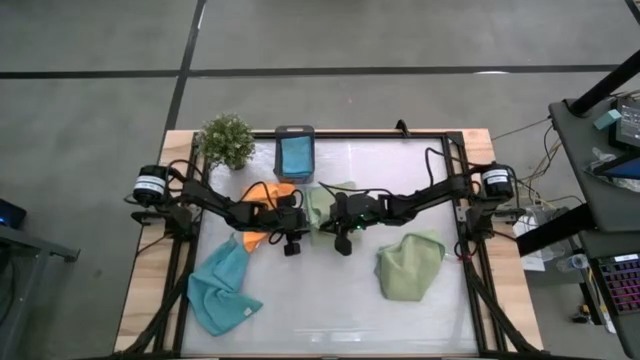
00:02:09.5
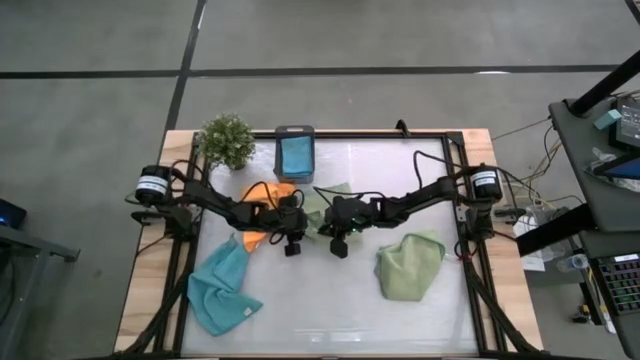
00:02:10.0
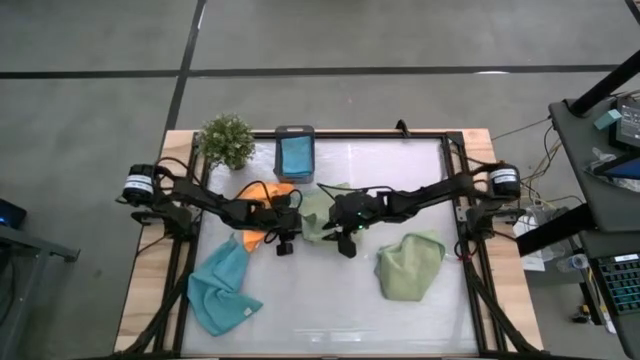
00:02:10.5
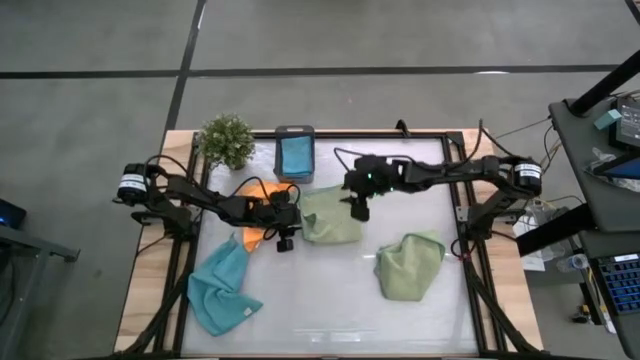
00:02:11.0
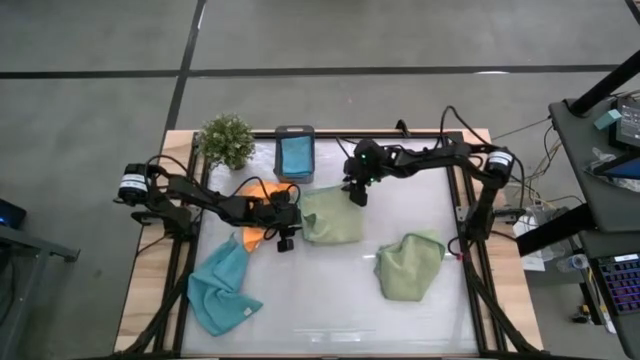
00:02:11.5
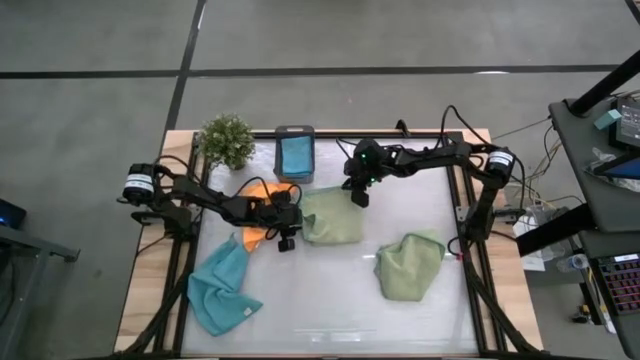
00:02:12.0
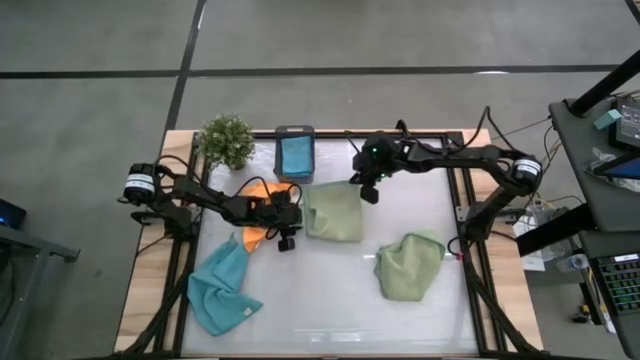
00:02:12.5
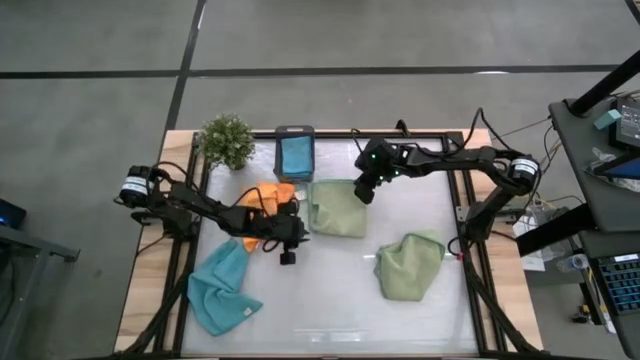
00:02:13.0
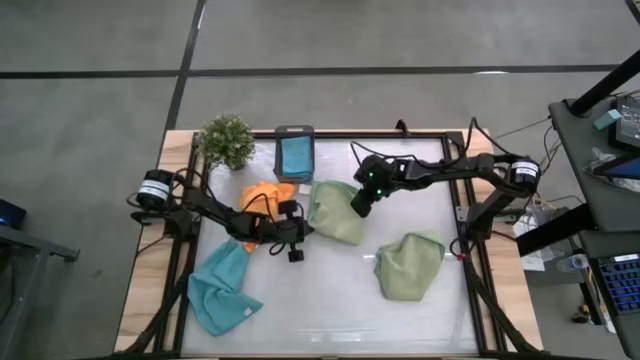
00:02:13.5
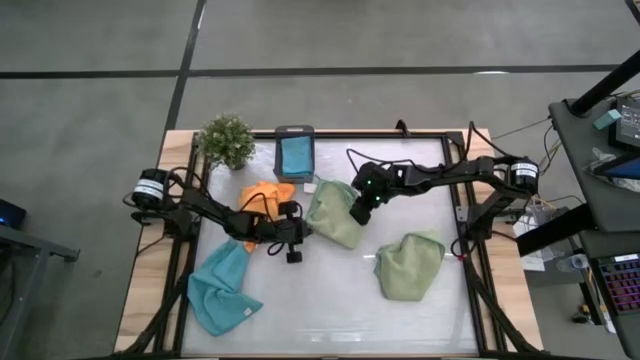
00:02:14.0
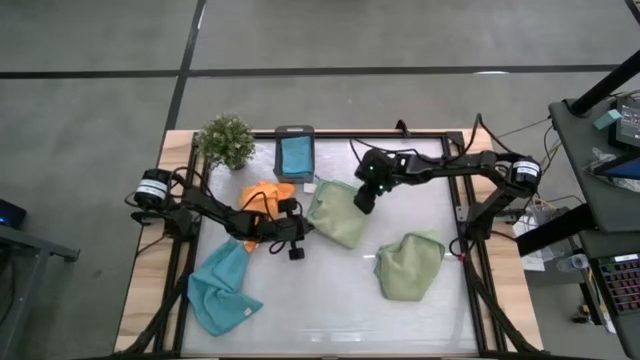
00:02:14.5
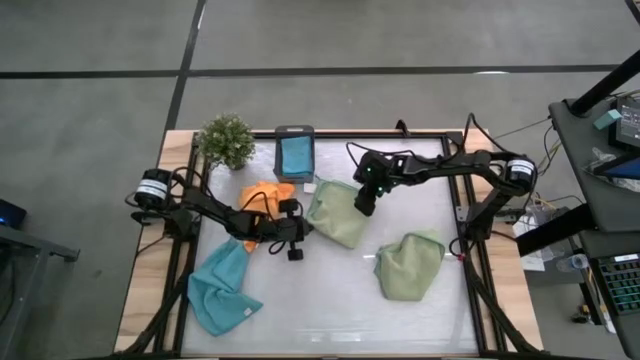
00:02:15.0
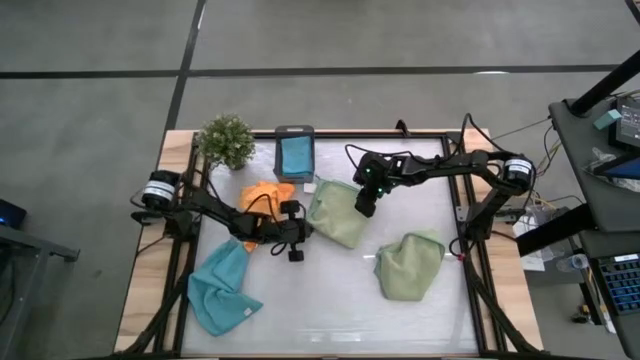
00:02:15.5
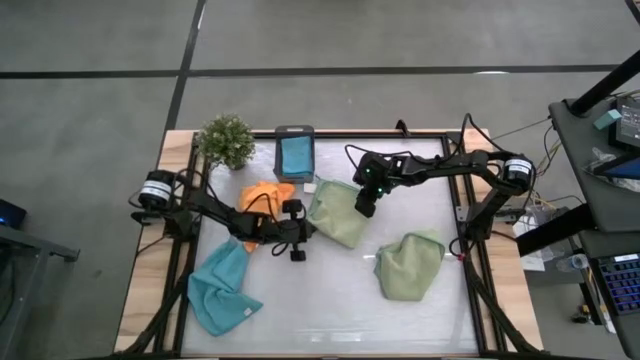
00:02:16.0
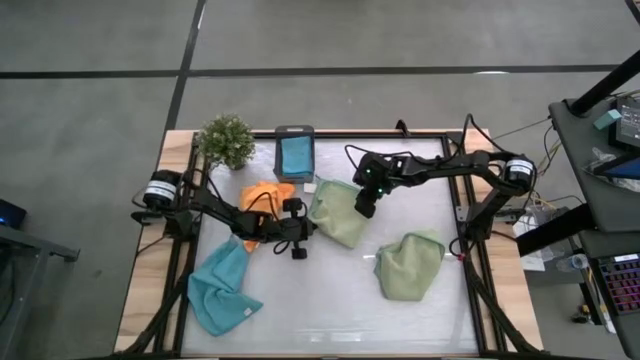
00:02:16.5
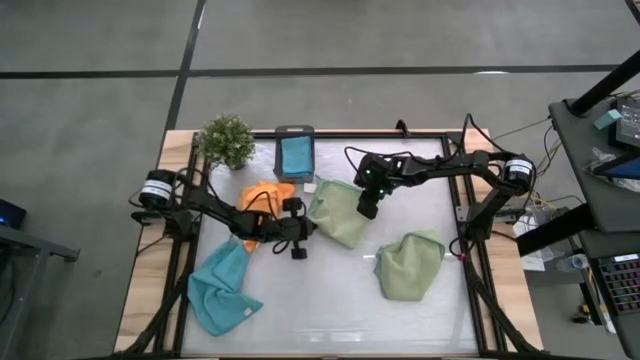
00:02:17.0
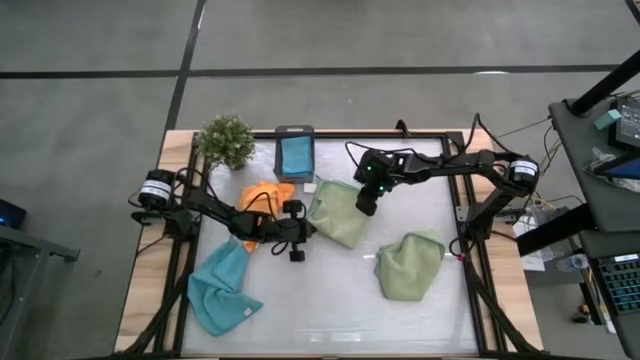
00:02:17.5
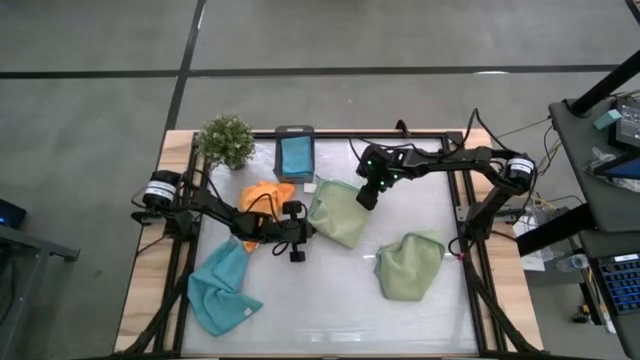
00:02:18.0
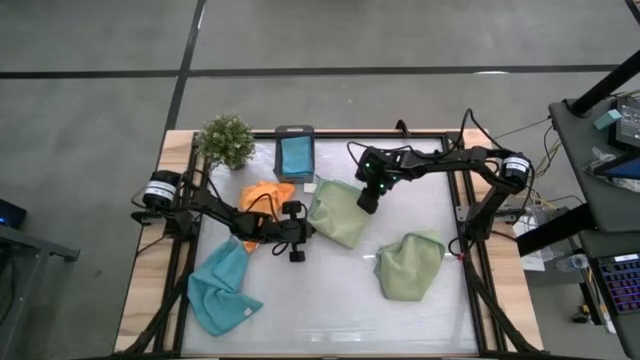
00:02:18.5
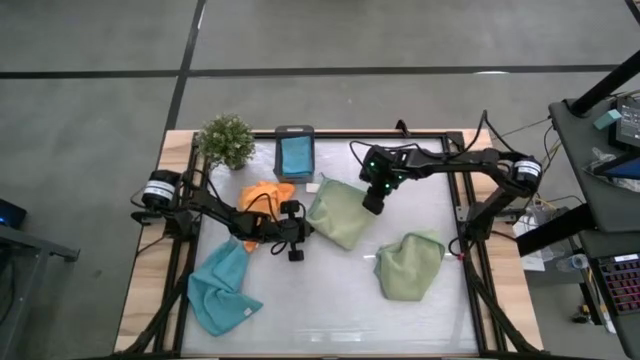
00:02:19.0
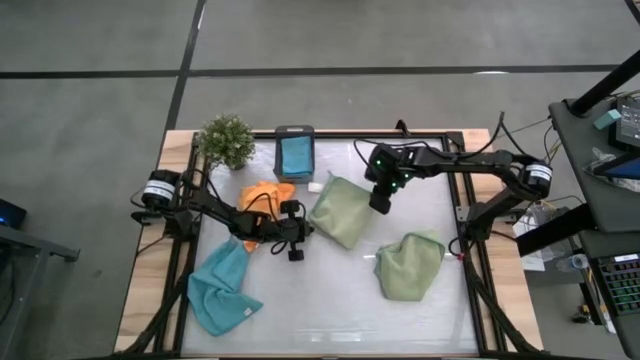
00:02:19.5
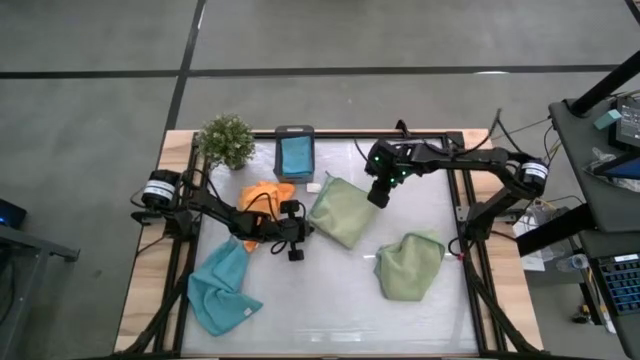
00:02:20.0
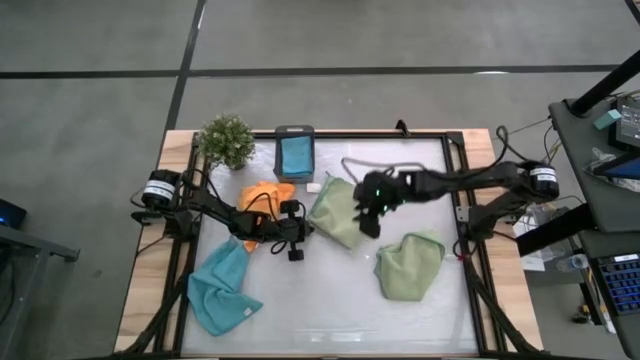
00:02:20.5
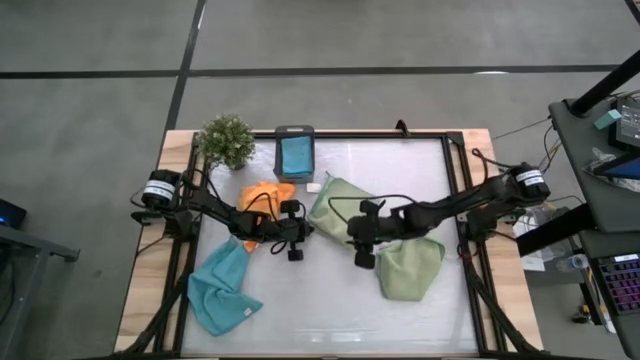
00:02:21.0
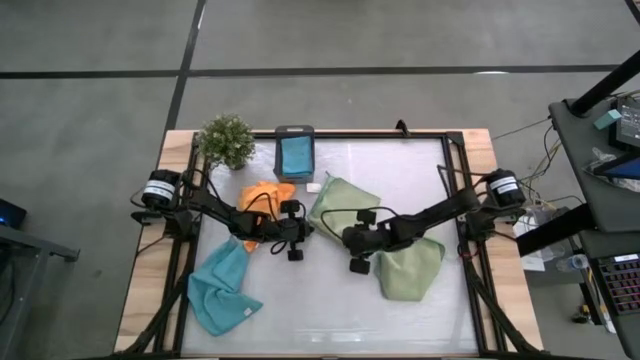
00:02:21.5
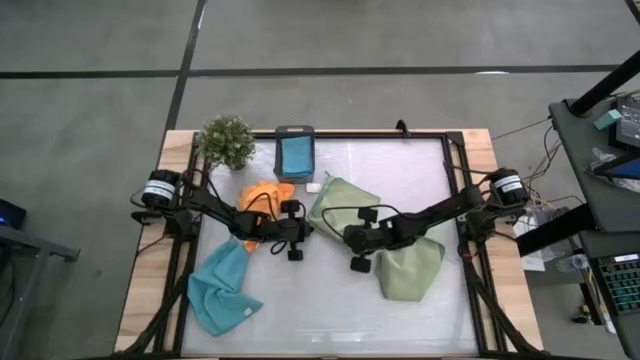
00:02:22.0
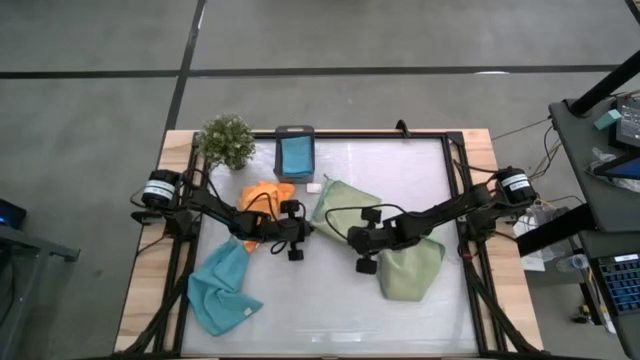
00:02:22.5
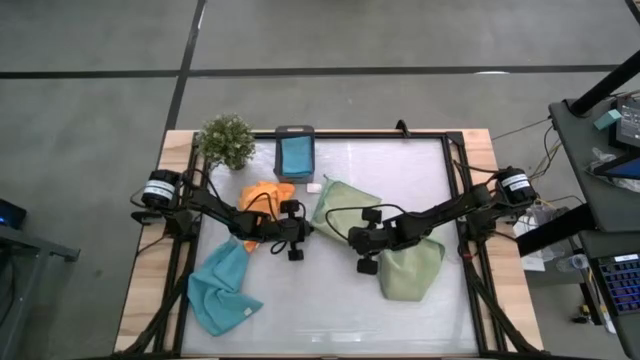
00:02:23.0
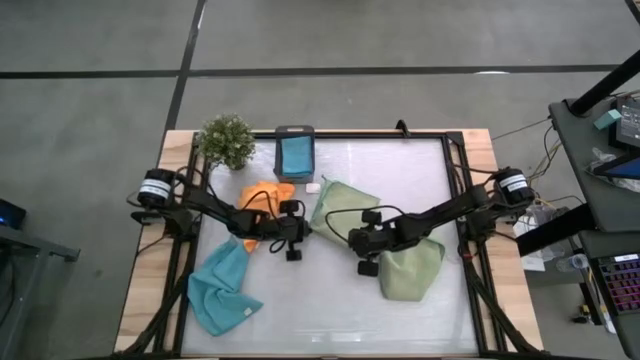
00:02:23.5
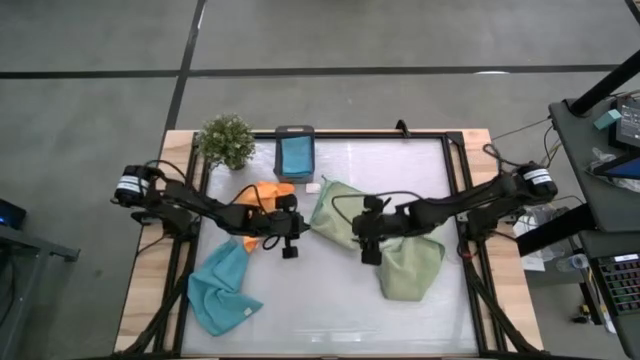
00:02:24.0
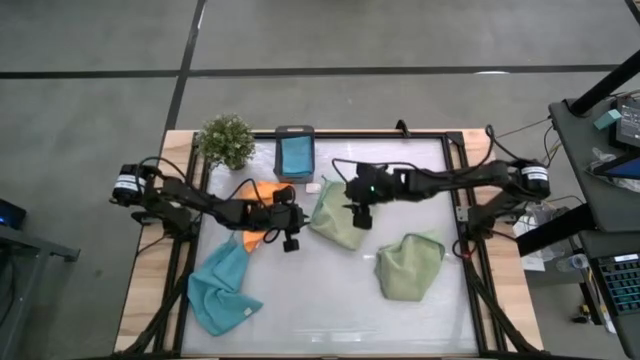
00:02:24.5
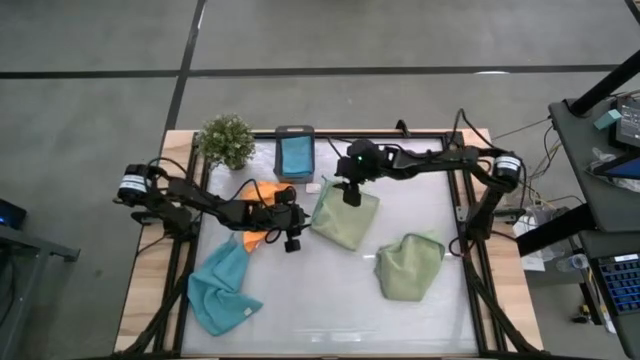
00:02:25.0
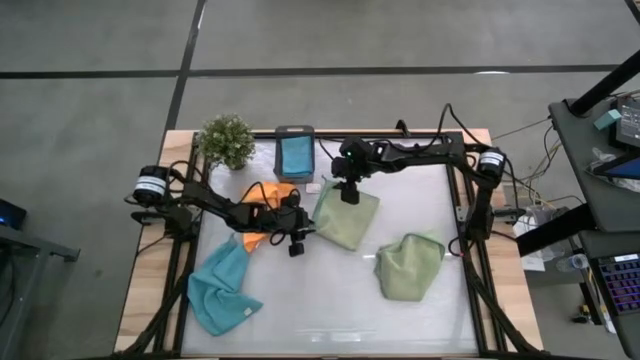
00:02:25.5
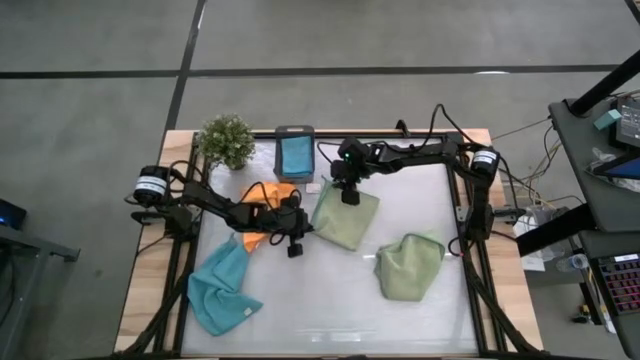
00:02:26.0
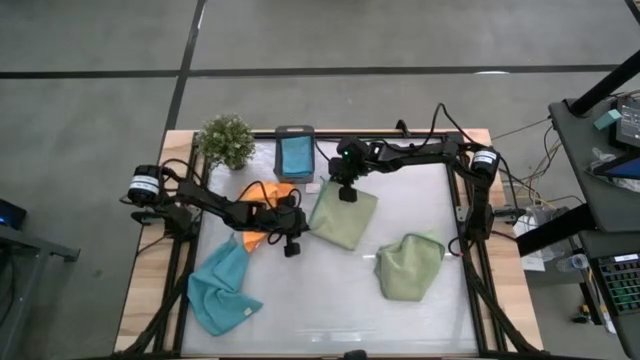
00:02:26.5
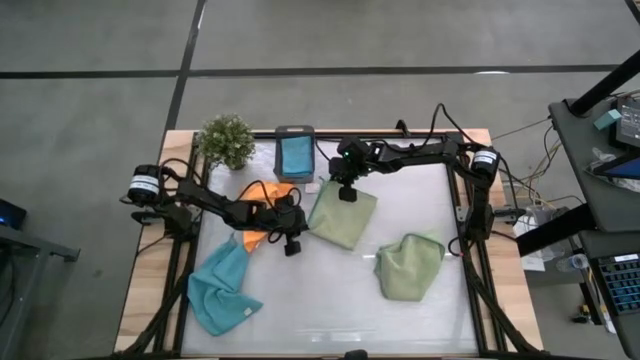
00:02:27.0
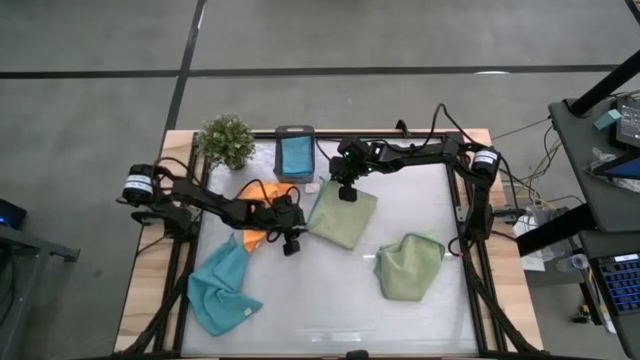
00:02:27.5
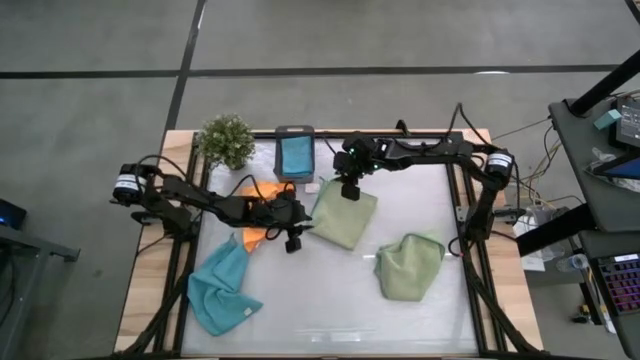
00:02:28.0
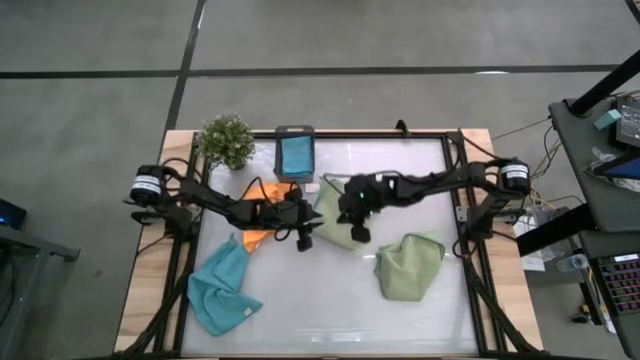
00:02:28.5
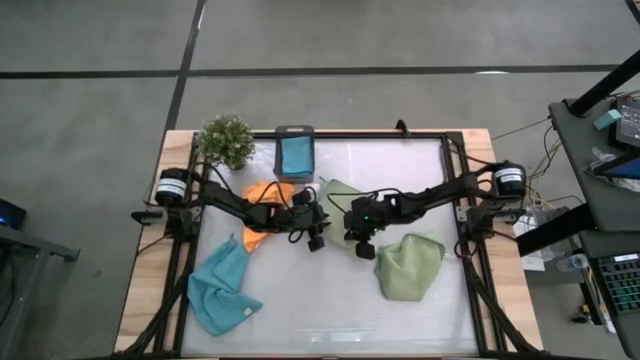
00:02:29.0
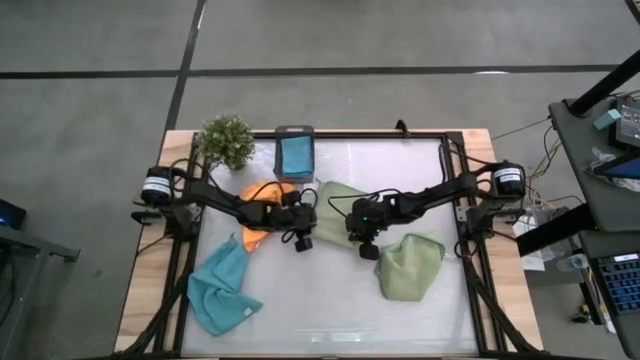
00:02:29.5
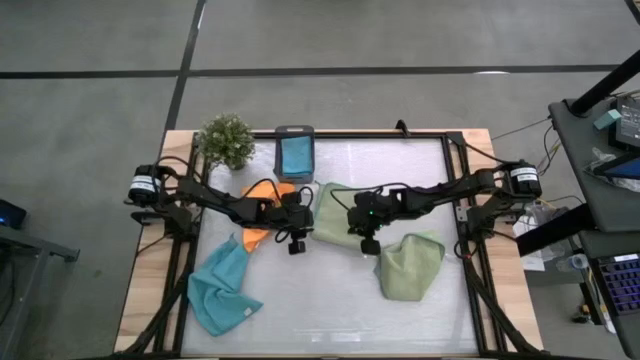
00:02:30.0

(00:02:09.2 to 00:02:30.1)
Task: Fold microfiber towels
Fold the top green towel
